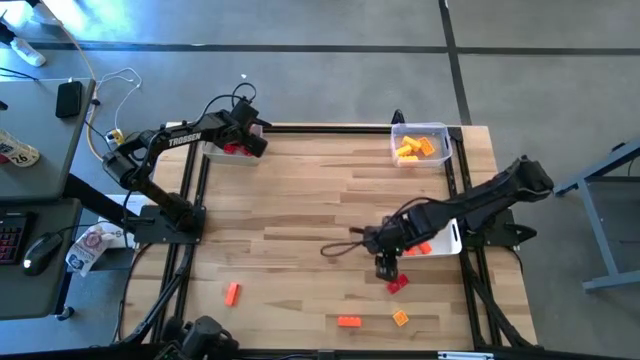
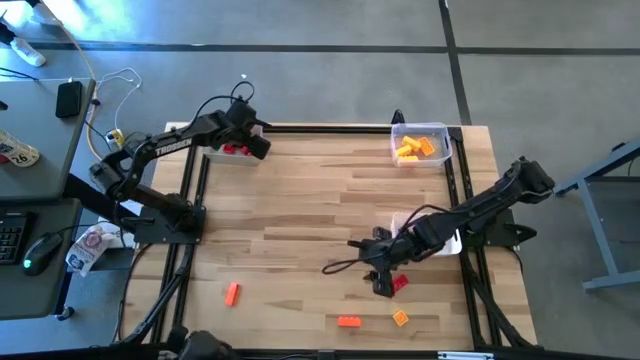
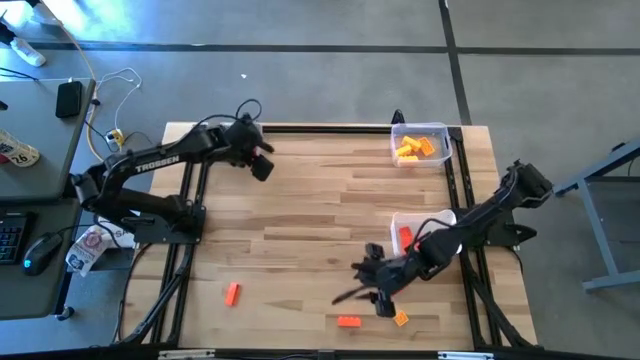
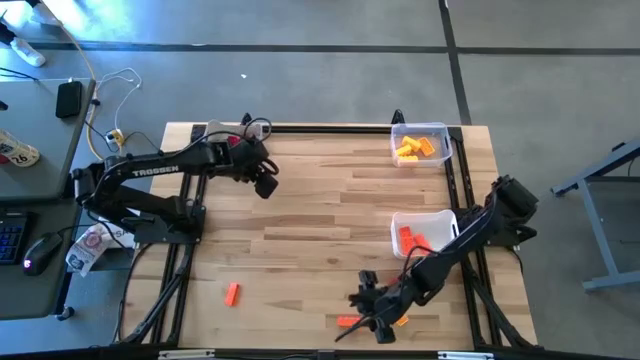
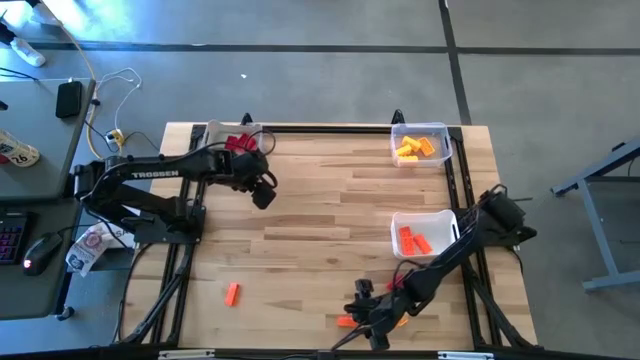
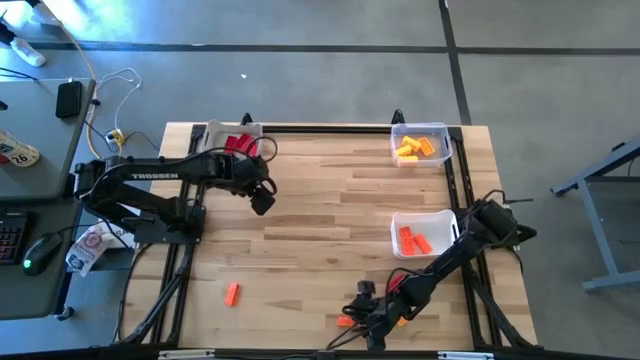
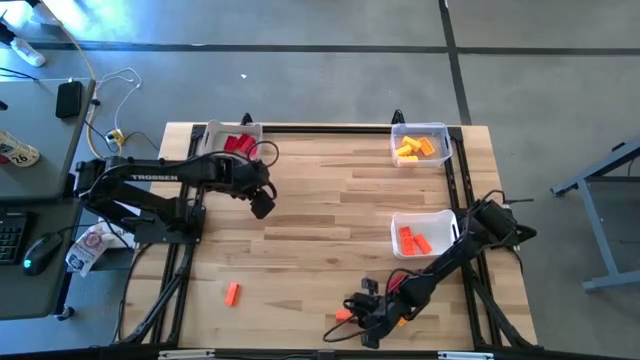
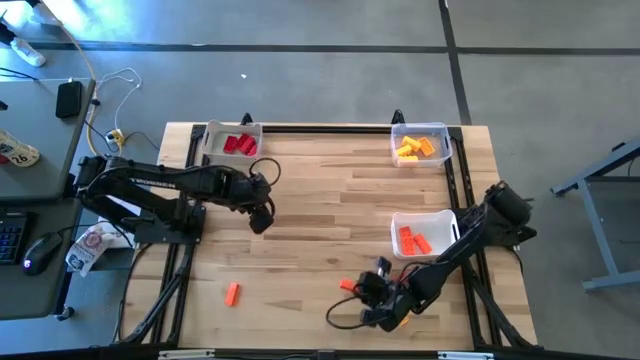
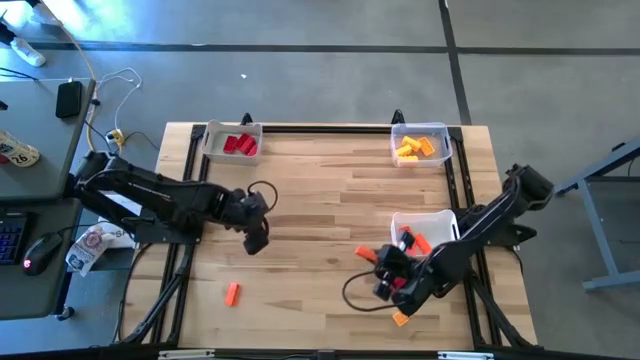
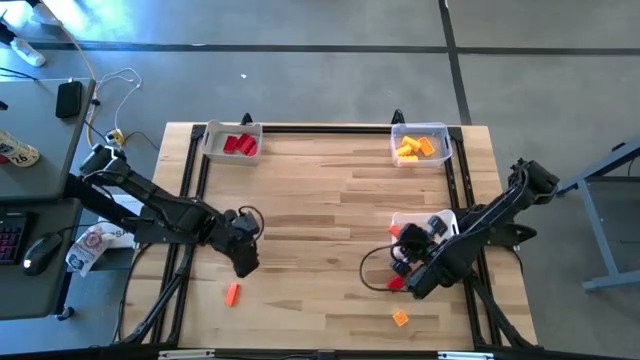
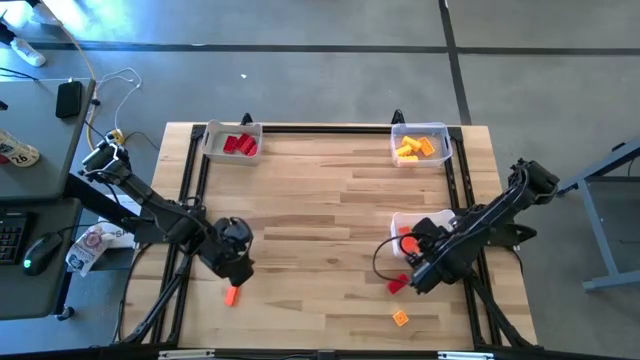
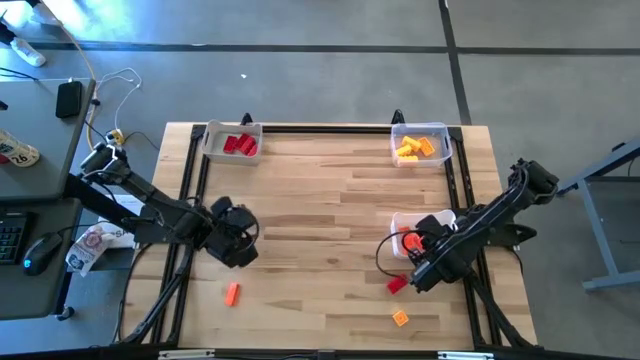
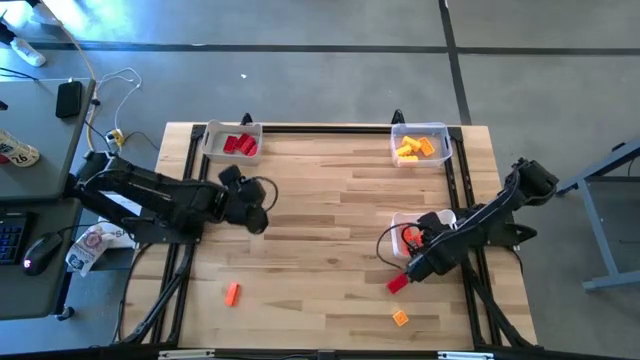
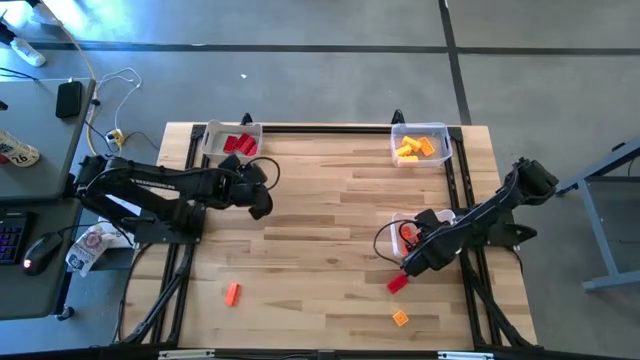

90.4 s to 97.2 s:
Task: Sort & place blocks by color
Put the orange game piece into the white bin

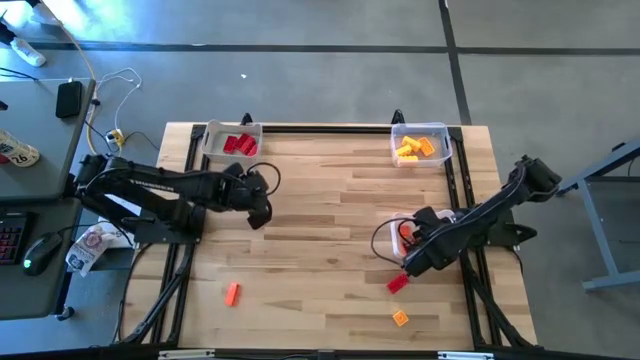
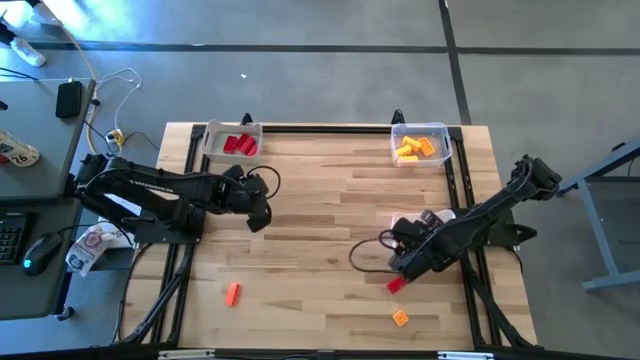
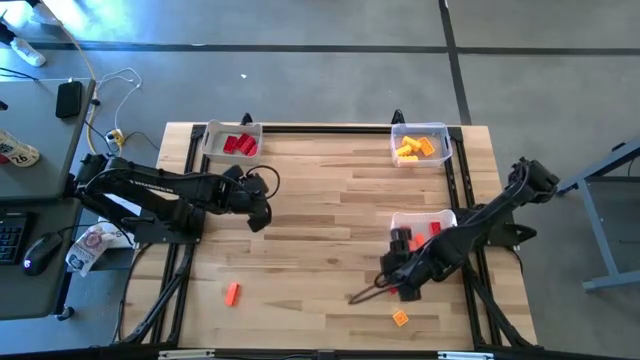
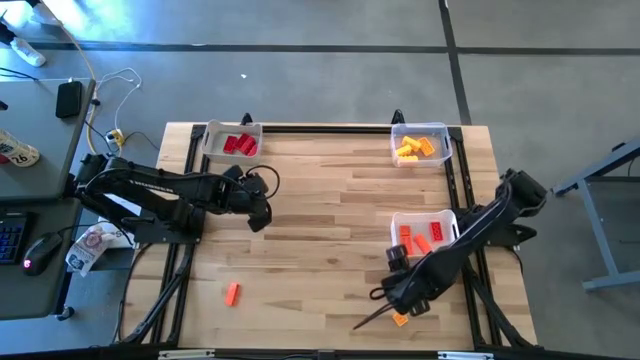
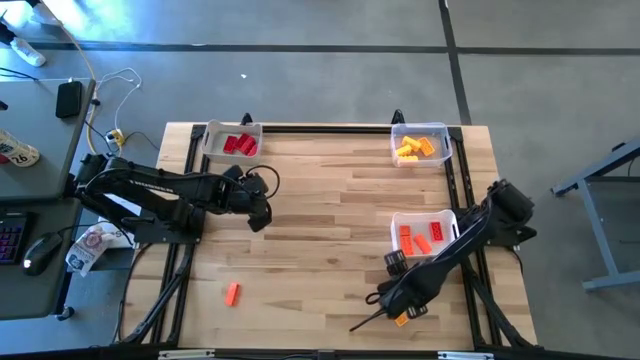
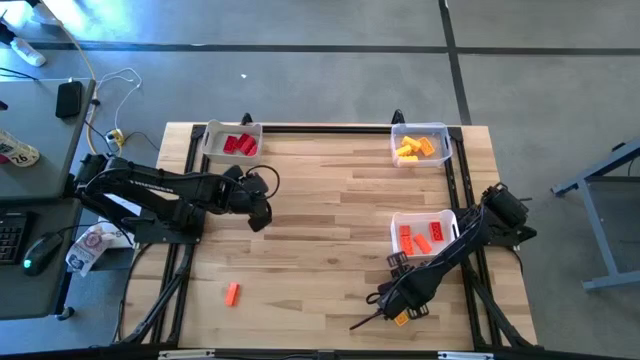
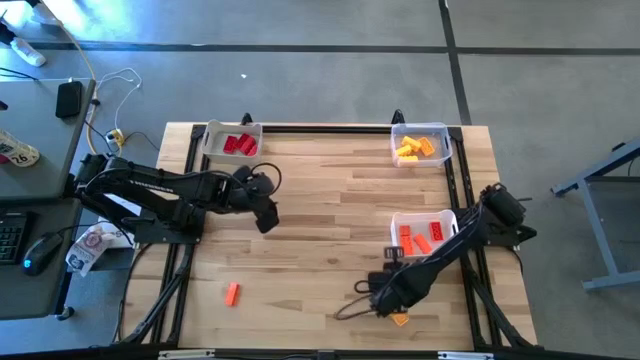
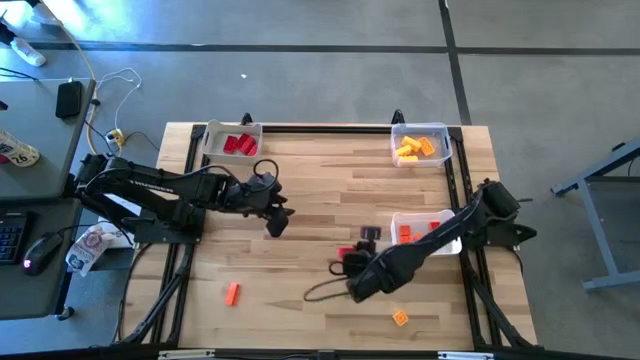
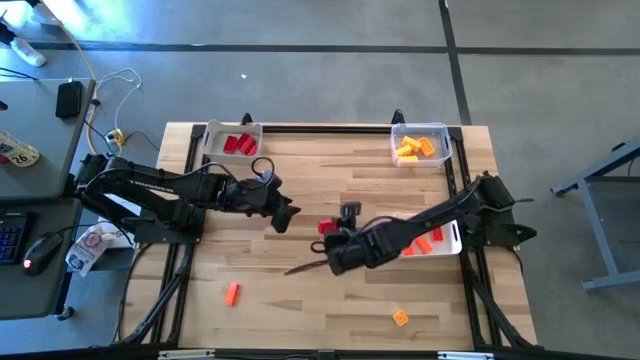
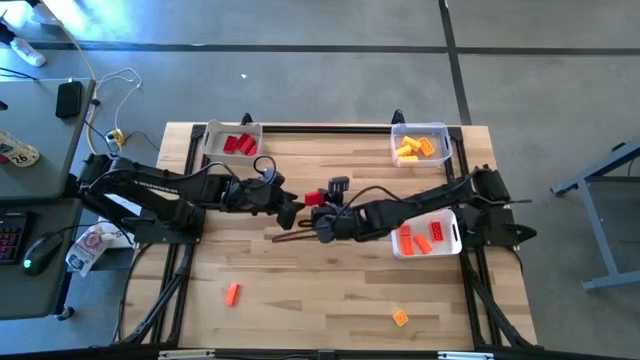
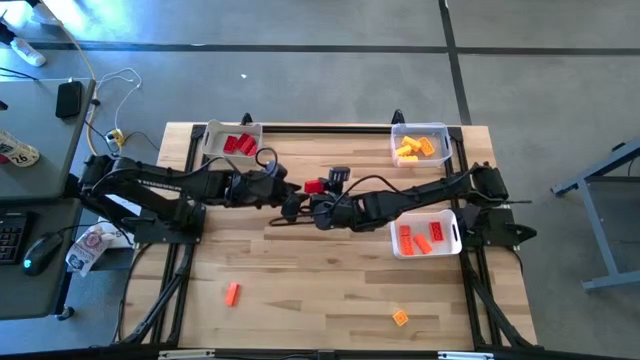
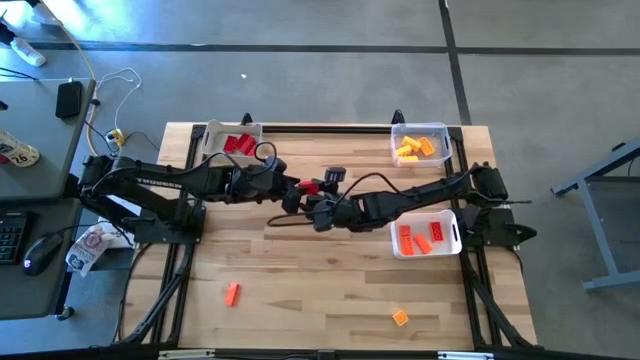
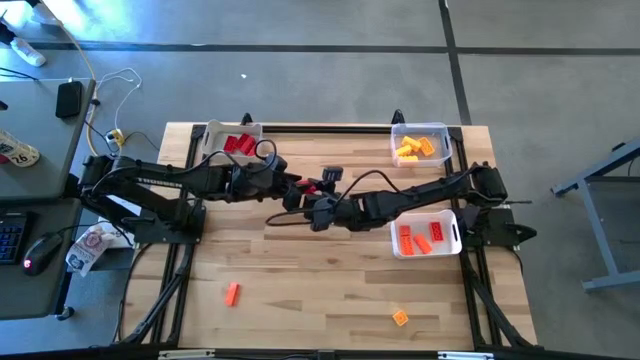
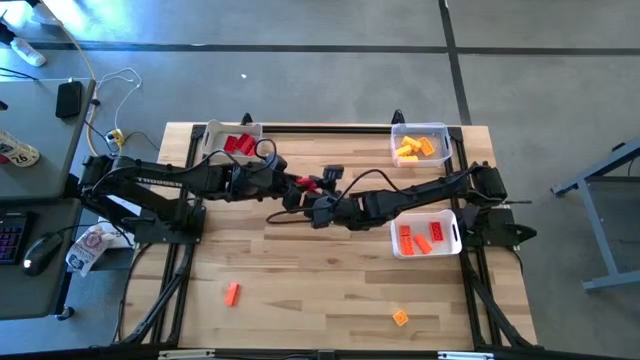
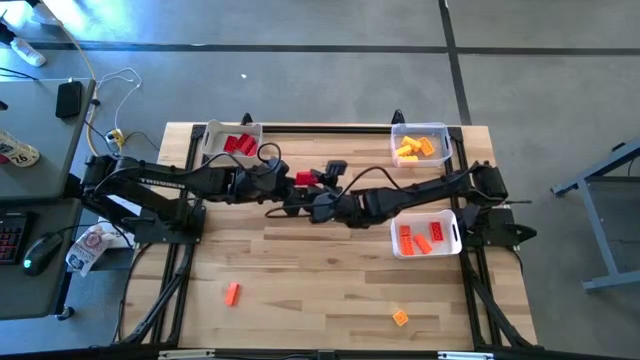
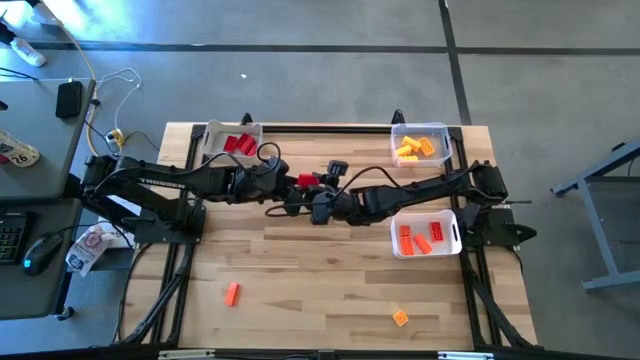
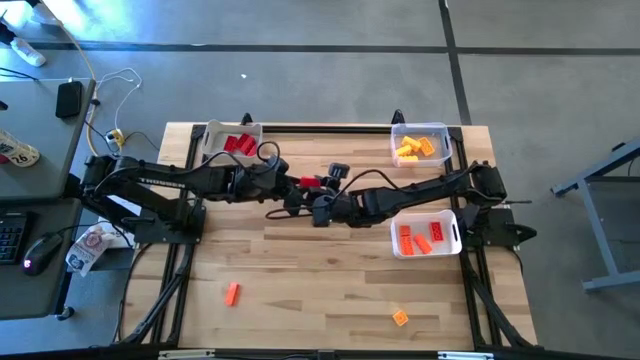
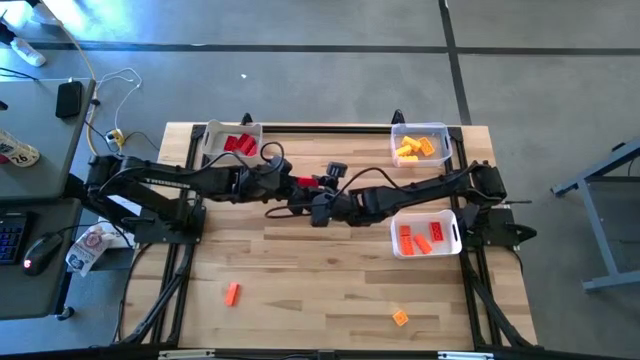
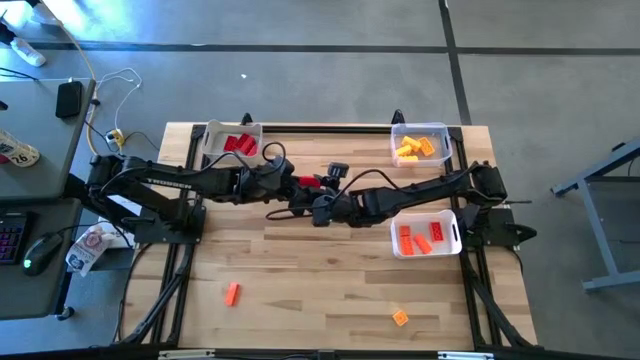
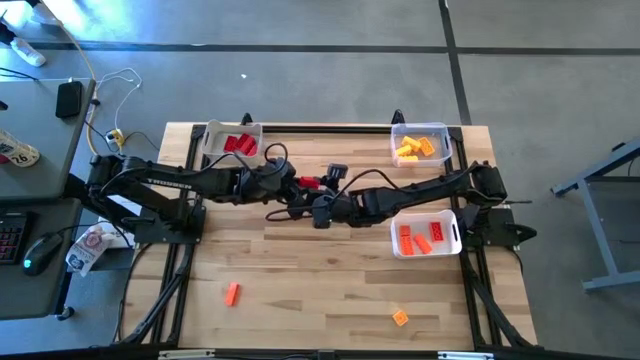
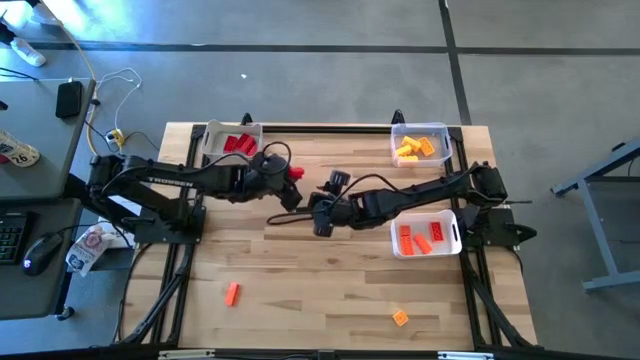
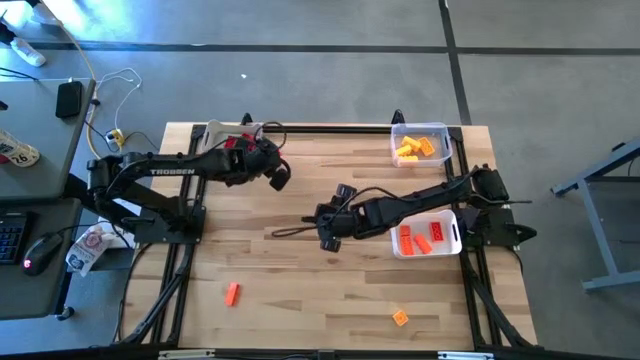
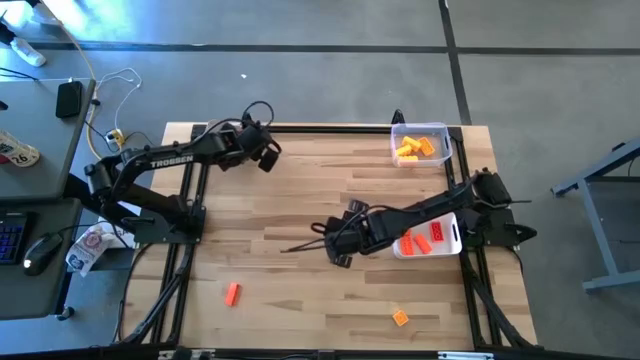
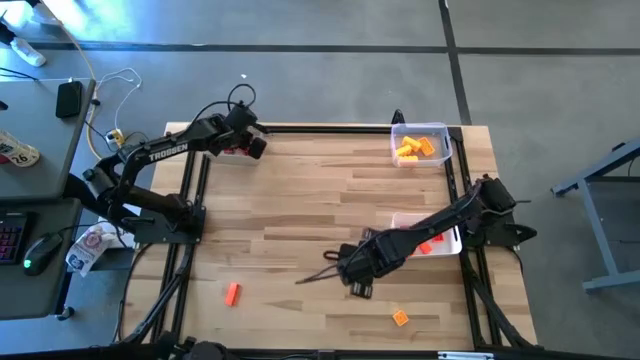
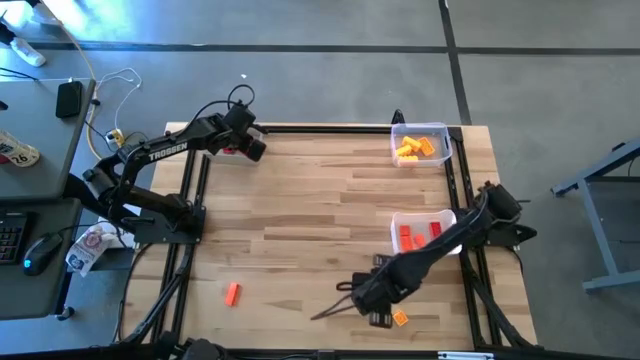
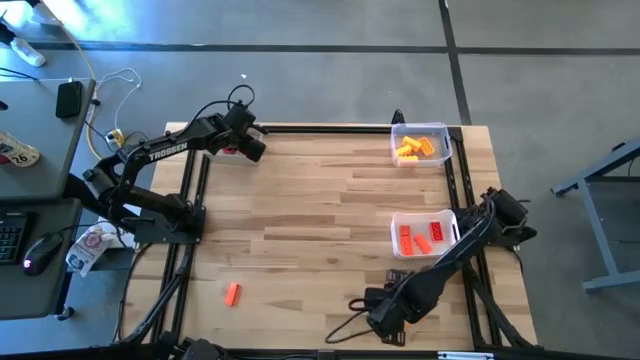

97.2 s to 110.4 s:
Put the red game piece into the gray bin
